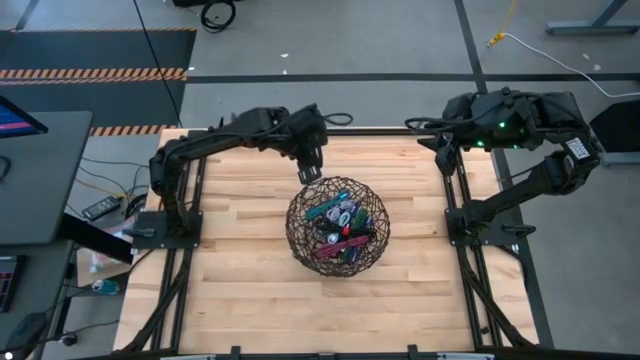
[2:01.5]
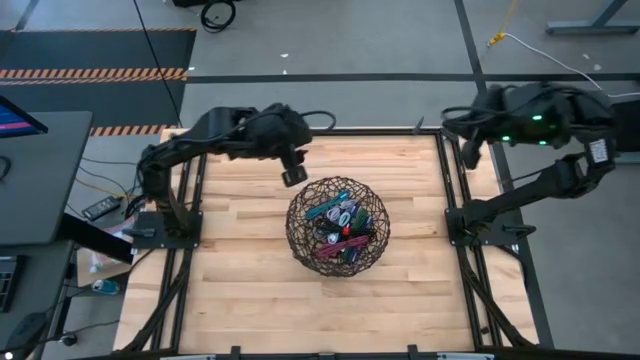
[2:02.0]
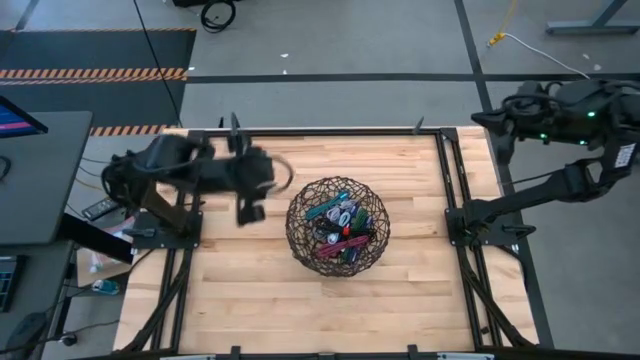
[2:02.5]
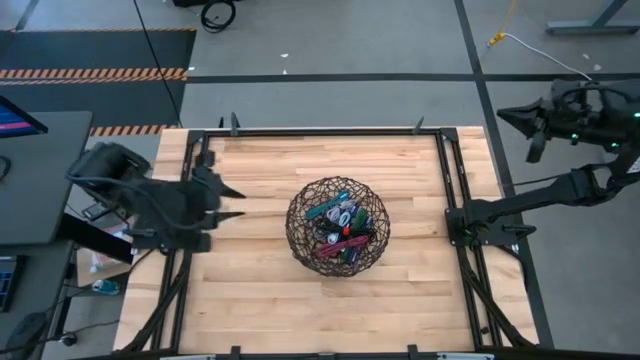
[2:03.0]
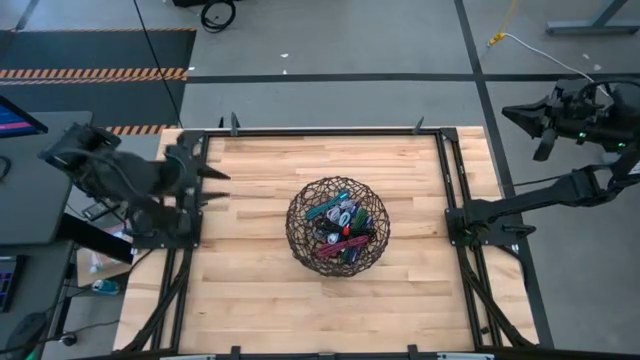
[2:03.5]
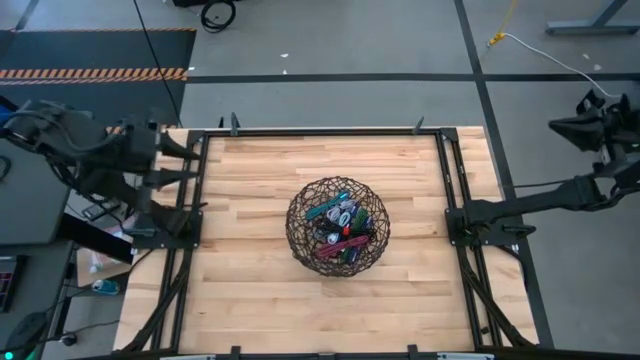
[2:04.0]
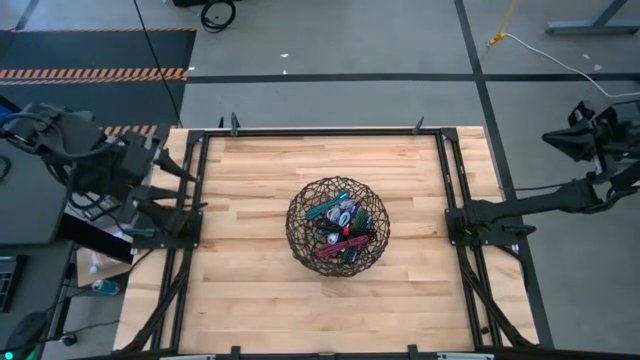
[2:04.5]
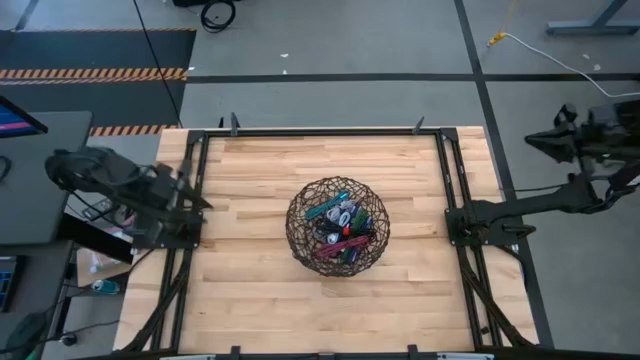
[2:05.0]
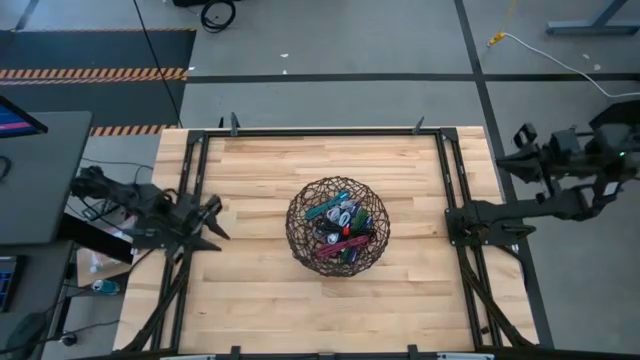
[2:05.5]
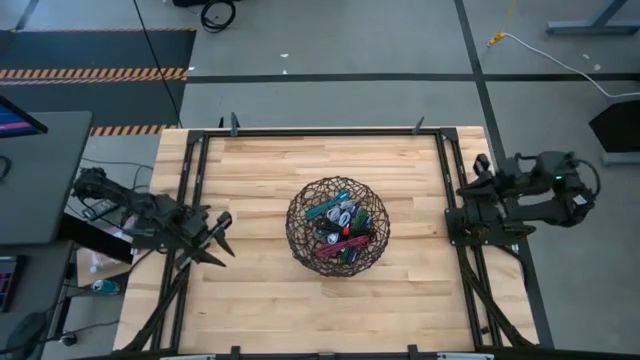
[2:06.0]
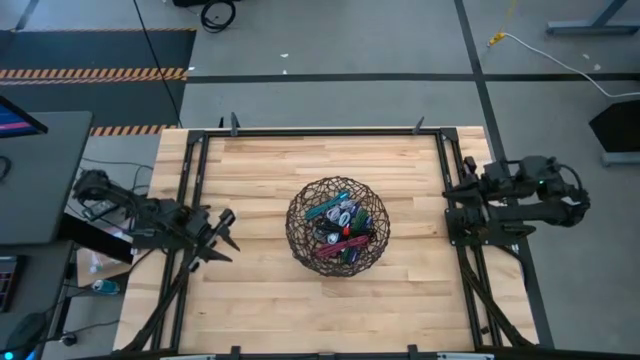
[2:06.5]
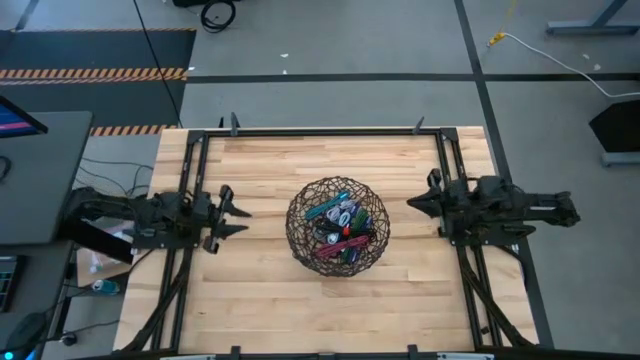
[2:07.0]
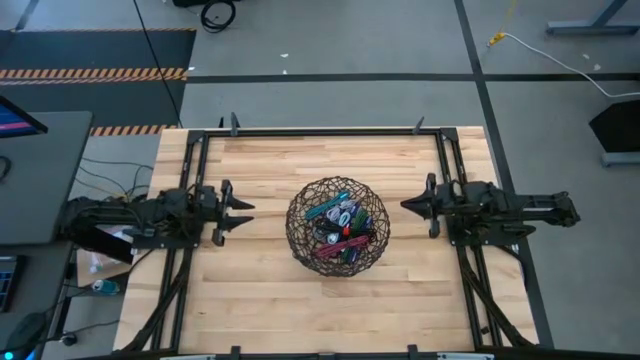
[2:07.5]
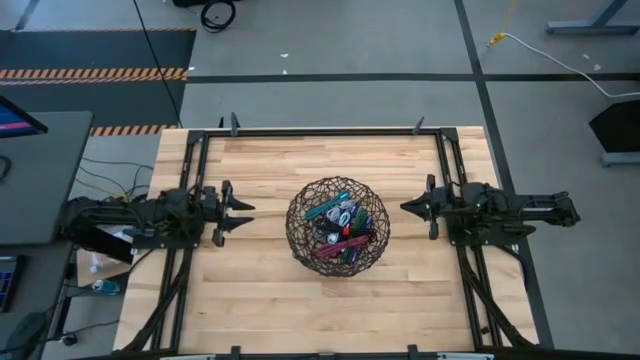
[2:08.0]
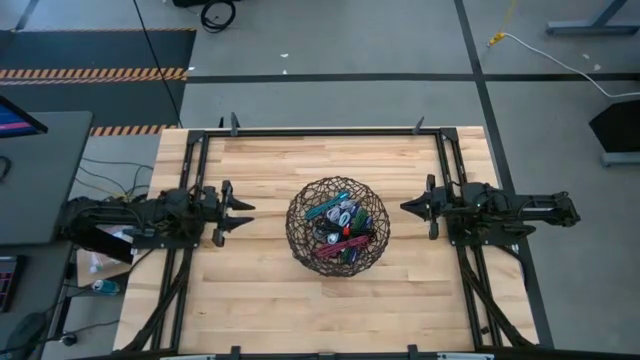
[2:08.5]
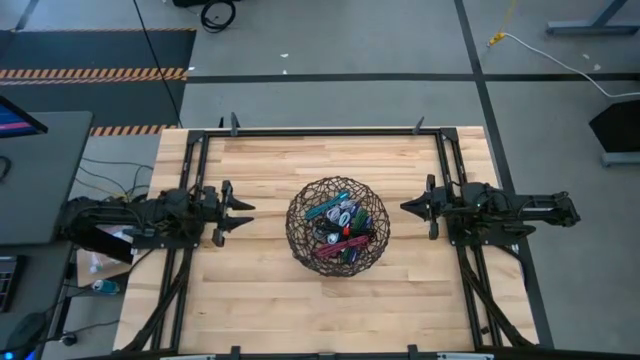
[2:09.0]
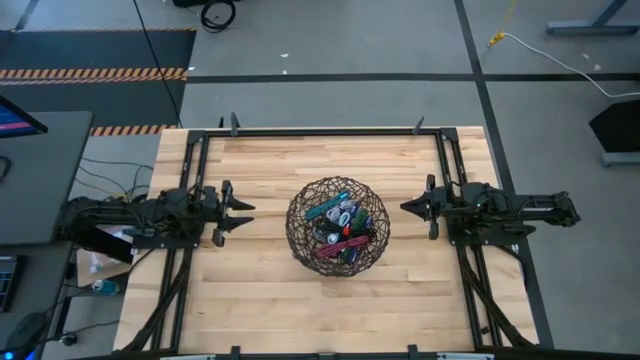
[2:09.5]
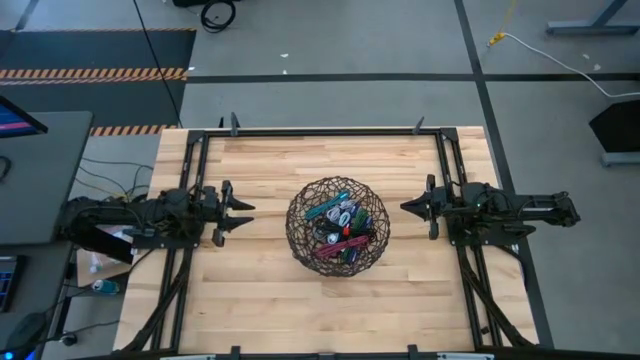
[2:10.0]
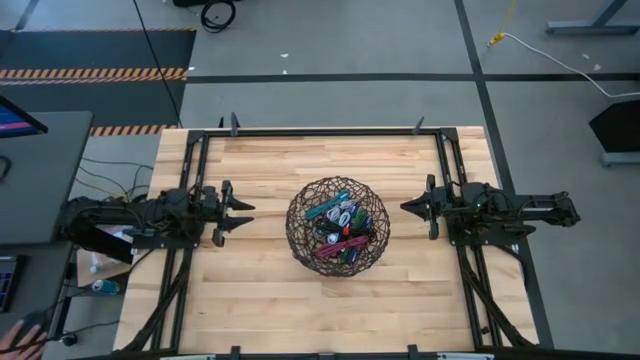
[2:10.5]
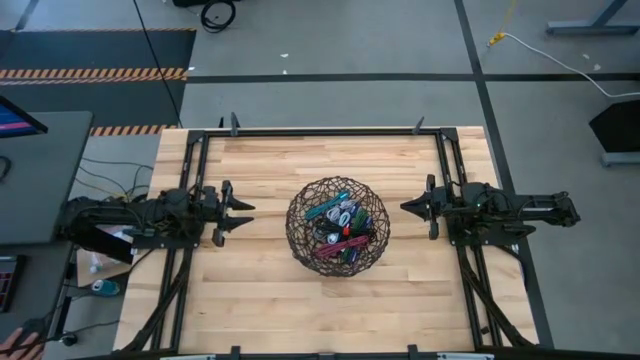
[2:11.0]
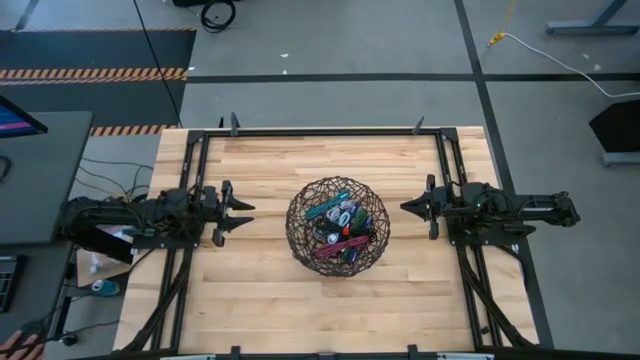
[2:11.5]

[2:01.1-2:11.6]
Task: Pick and place USB-C Cables
Return to Home Position

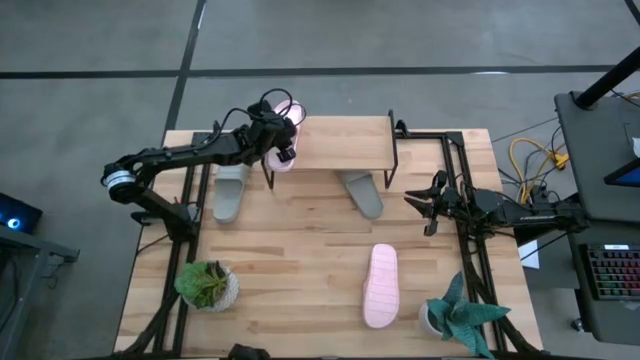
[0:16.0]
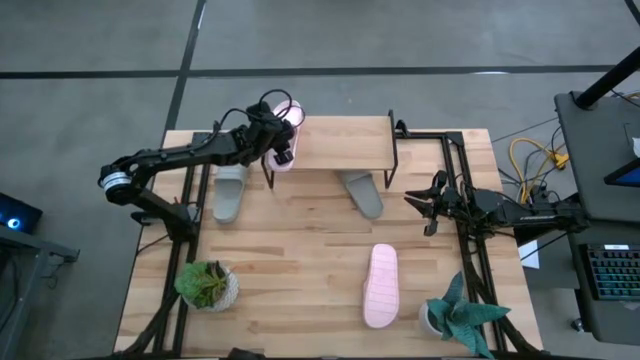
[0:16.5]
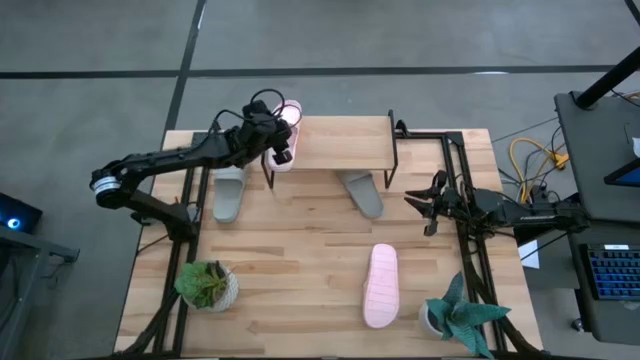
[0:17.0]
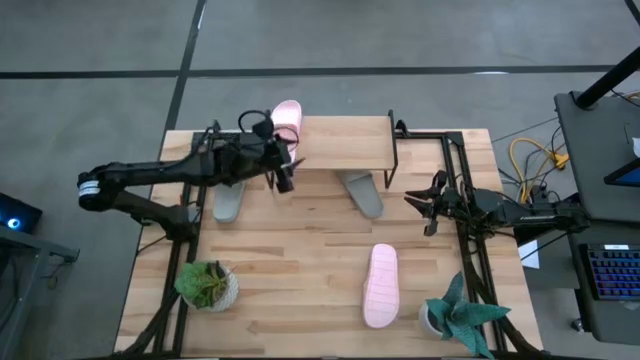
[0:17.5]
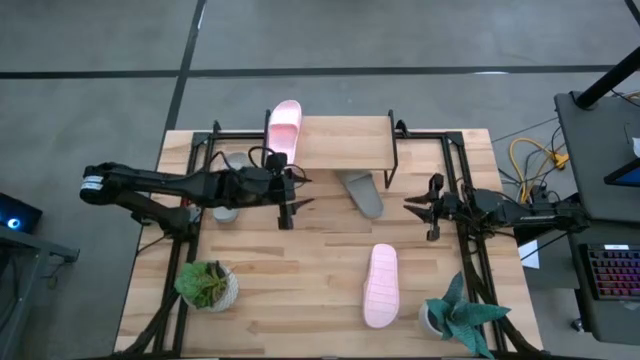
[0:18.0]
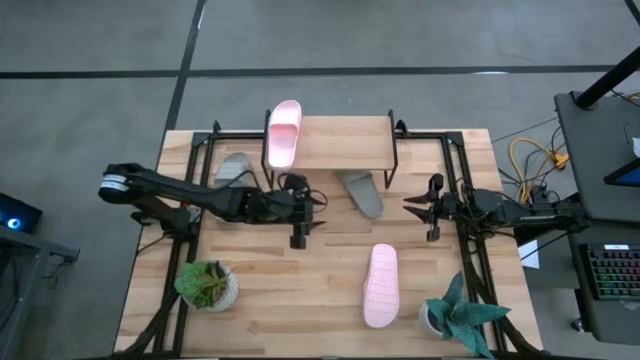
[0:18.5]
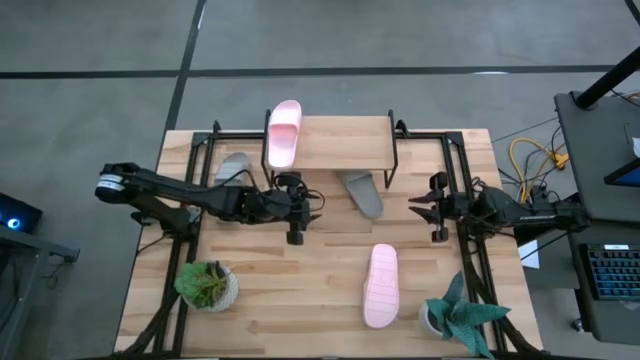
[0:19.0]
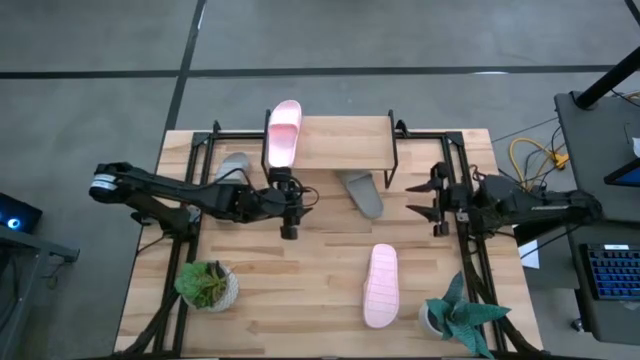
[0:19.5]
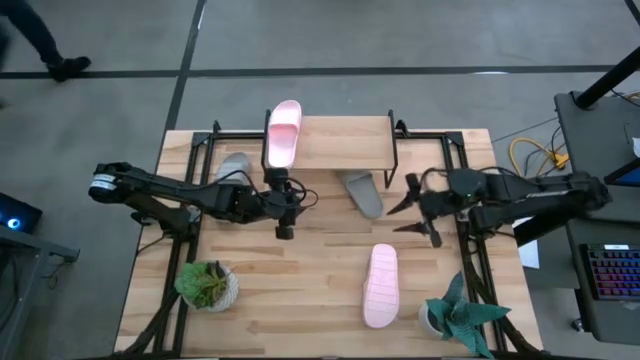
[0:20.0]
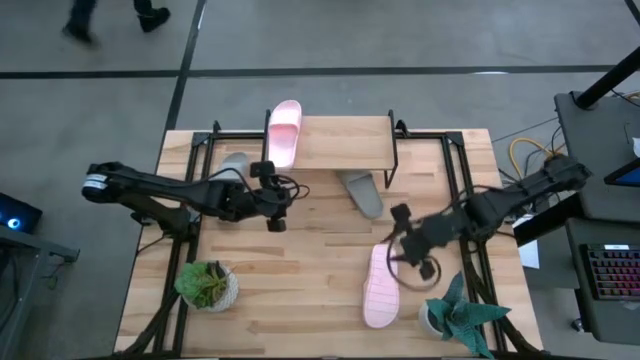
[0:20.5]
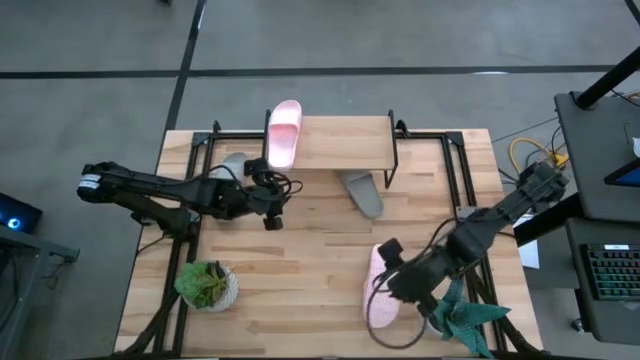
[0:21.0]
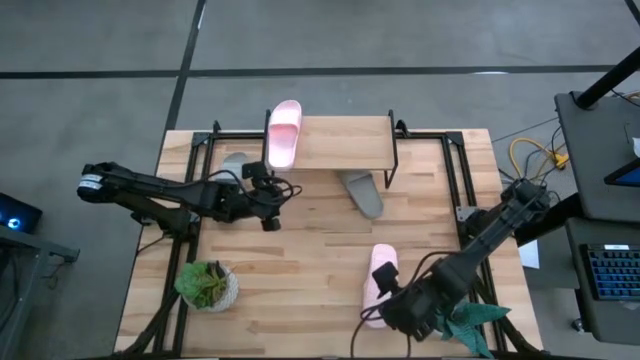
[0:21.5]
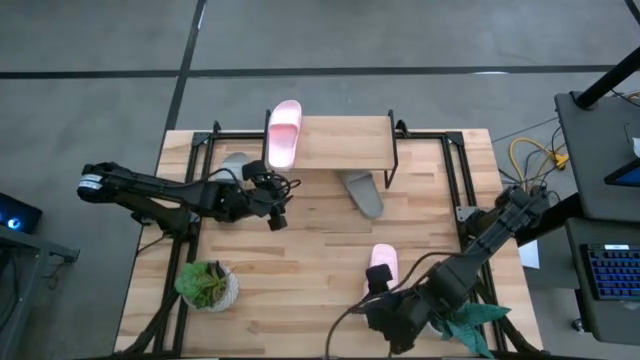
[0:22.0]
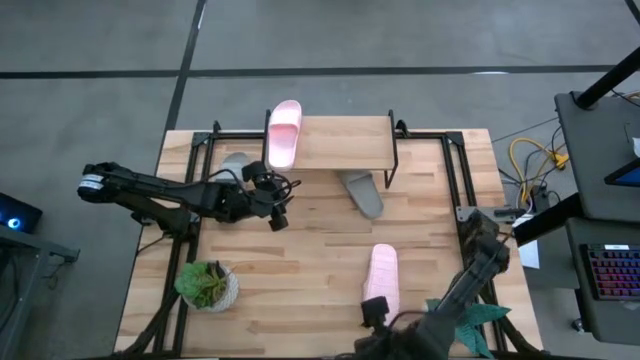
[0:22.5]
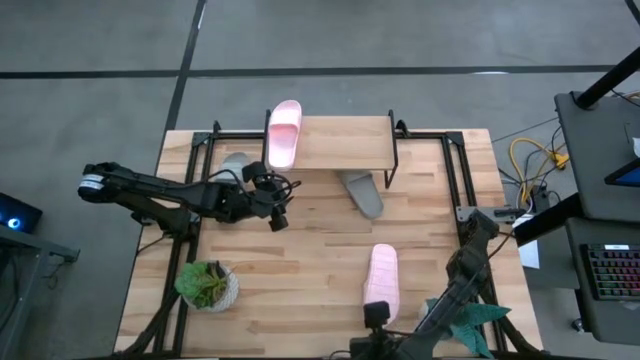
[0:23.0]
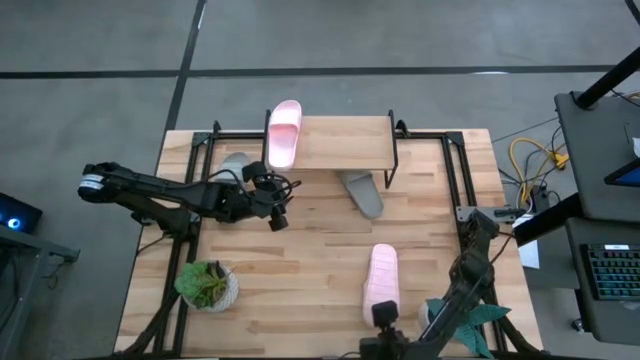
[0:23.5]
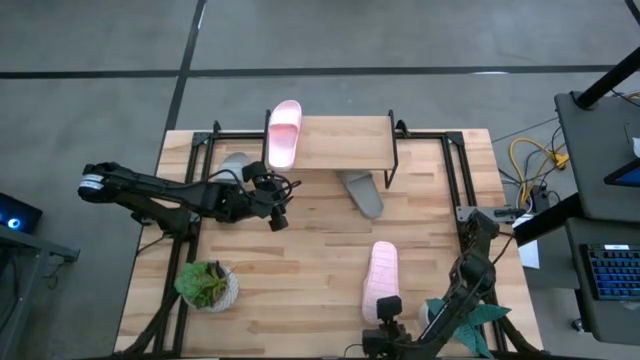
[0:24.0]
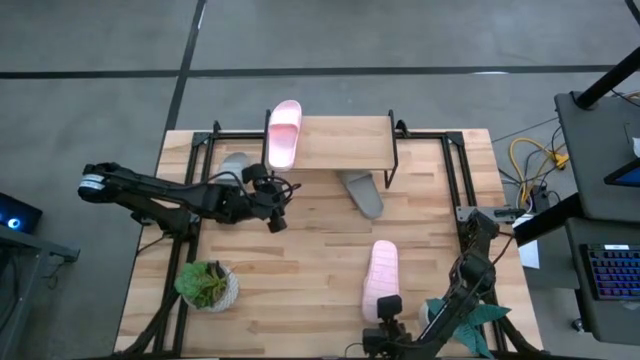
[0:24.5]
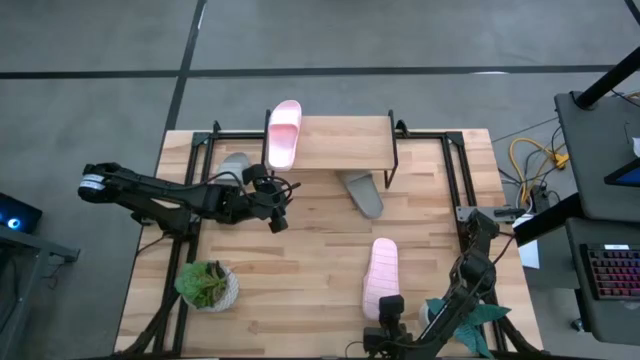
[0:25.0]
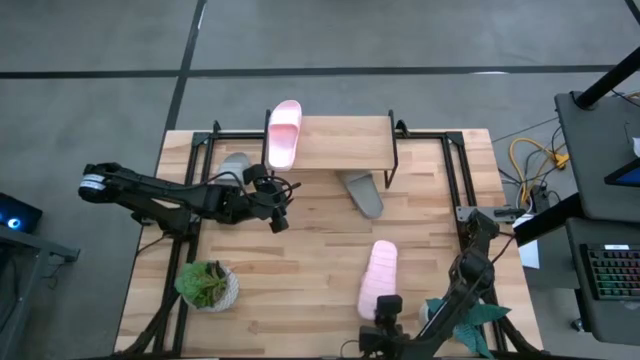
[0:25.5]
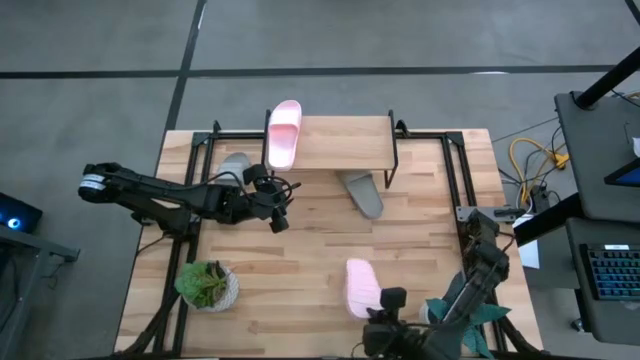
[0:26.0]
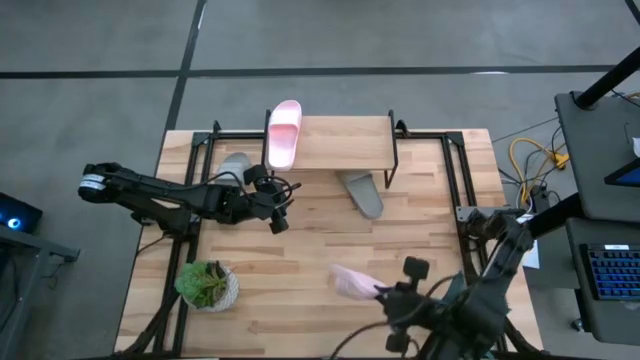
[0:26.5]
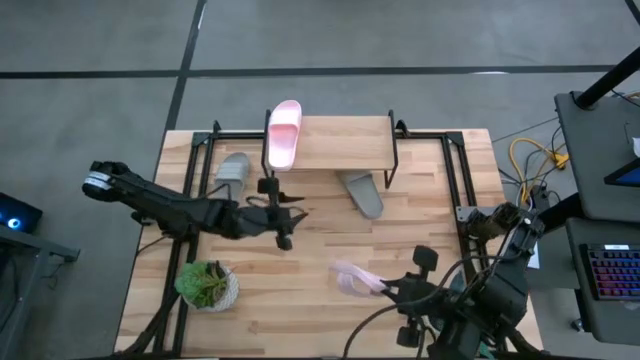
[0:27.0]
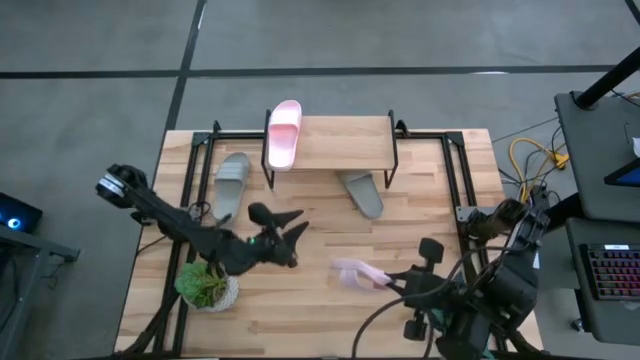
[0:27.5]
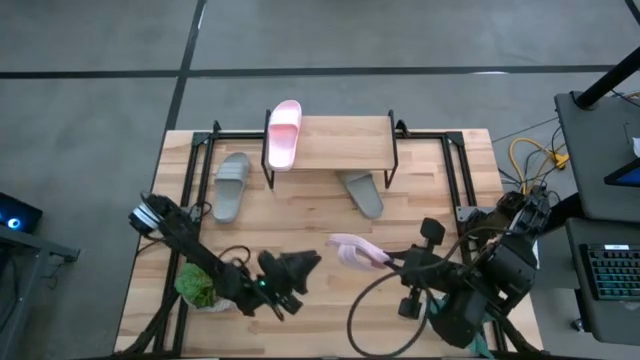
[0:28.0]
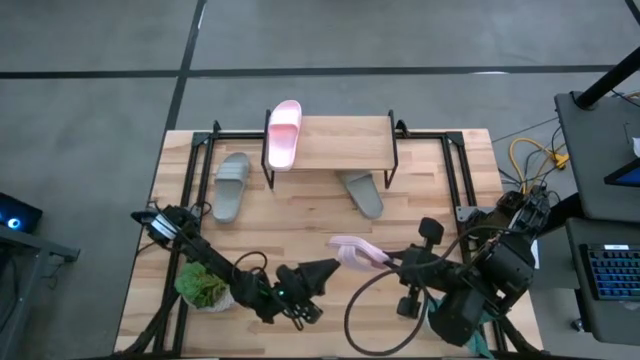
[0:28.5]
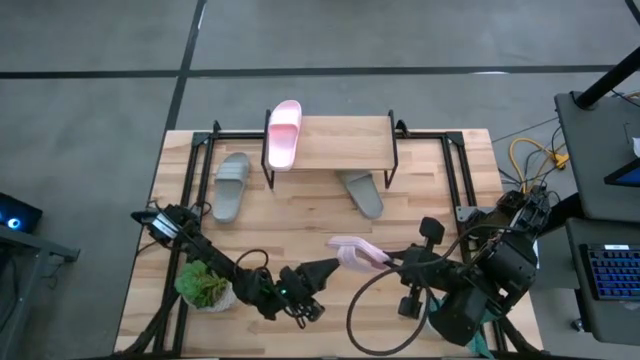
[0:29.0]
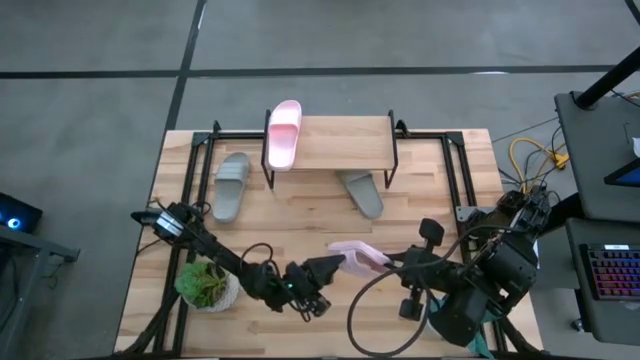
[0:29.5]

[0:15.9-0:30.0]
Task: Pick and place slides into the shelf
Put the pink slides on the shelf
